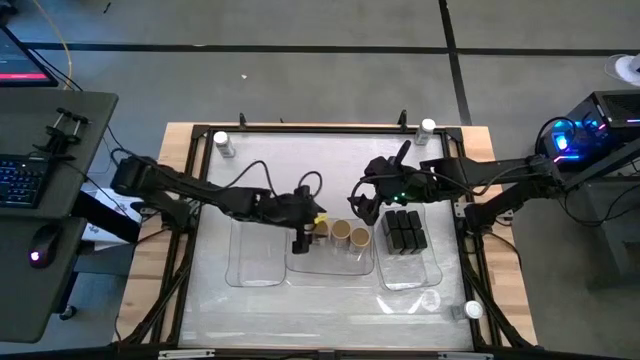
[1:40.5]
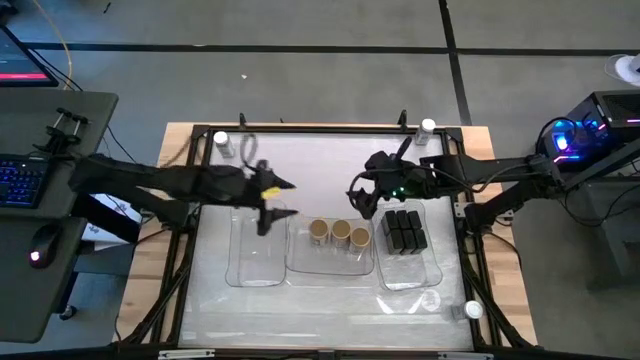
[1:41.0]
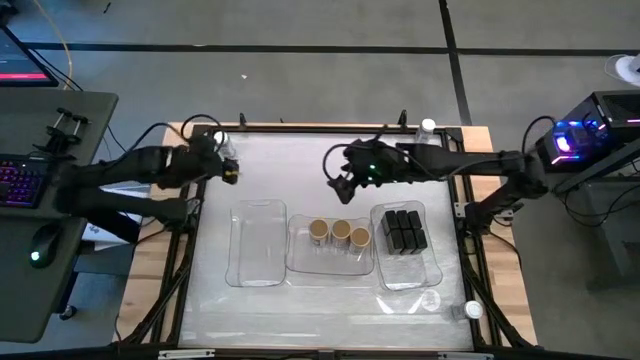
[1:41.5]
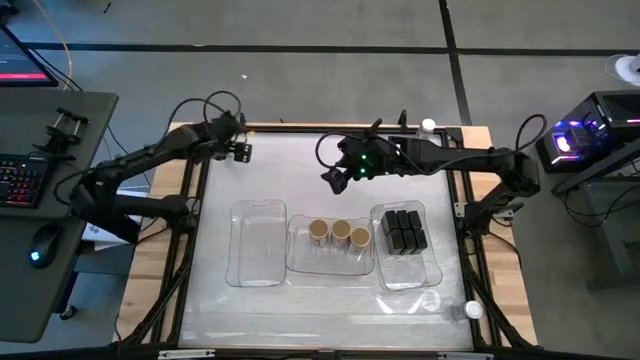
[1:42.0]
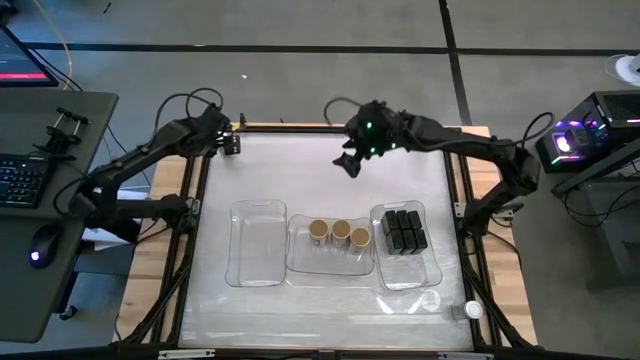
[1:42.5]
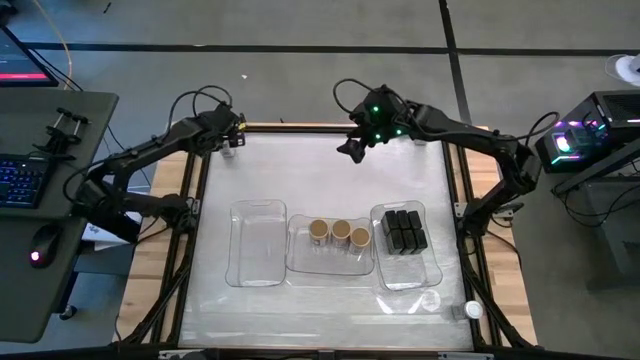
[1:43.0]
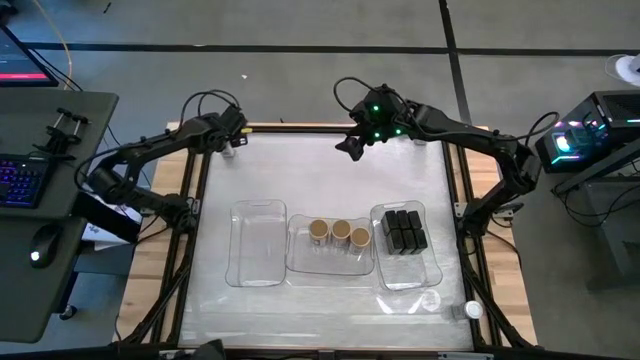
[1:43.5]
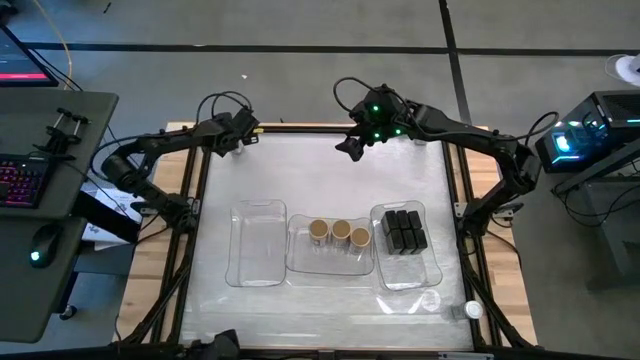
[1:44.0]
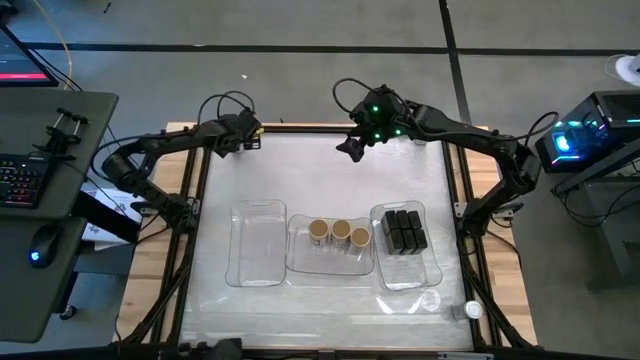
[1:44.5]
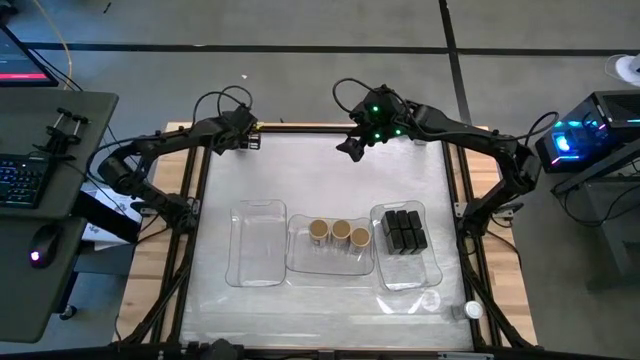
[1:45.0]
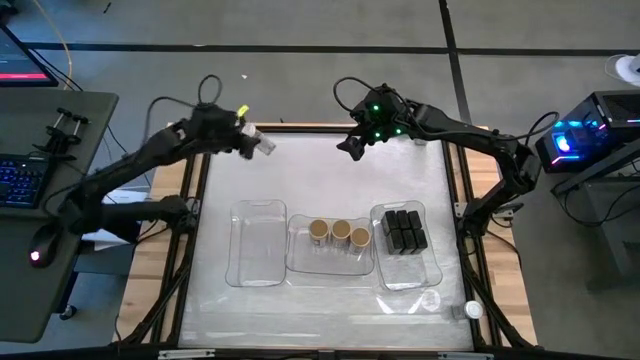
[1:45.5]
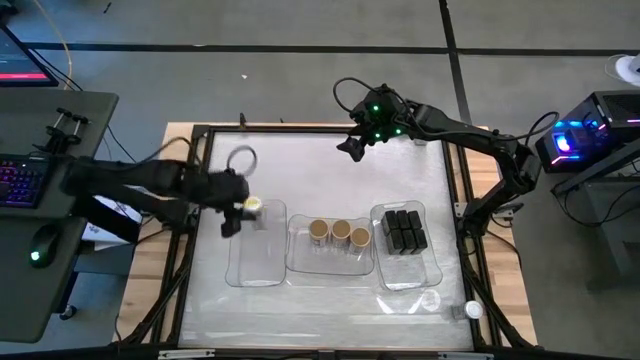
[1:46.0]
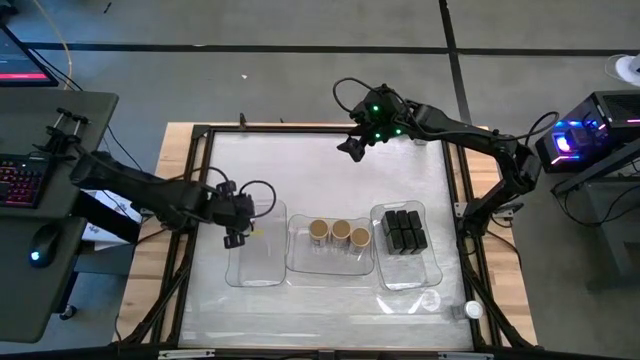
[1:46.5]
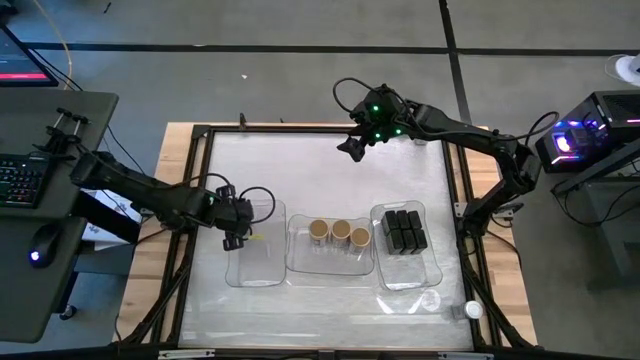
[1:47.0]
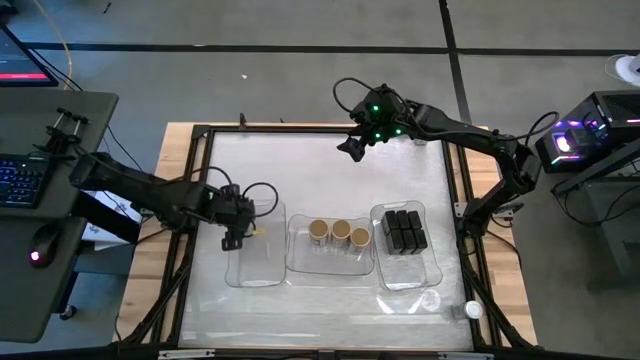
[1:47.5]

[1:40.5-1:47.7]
Task: Sort spices by type
Put the white seasoning bottle into the left transparent bin

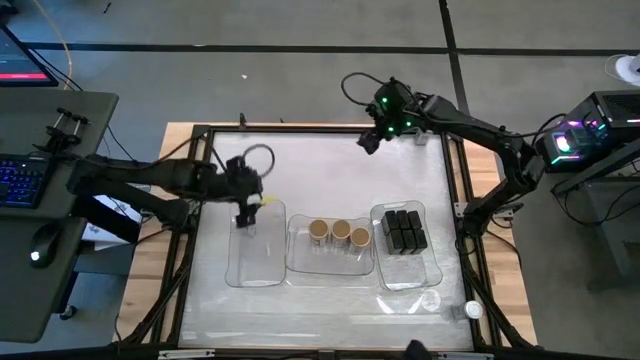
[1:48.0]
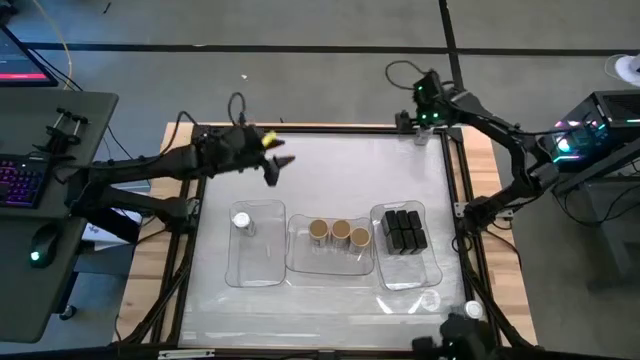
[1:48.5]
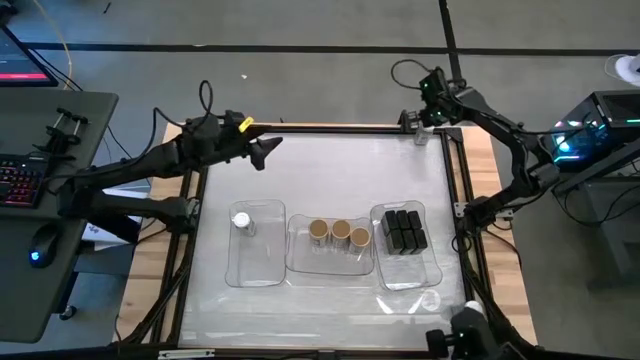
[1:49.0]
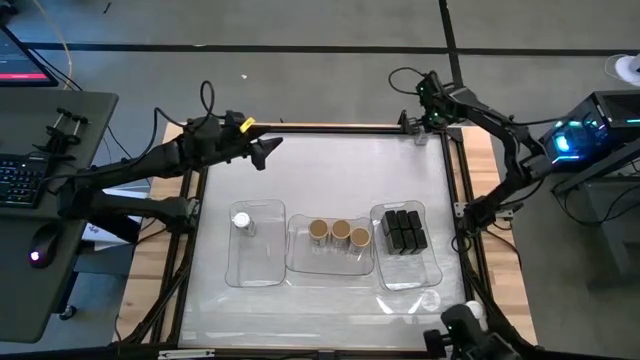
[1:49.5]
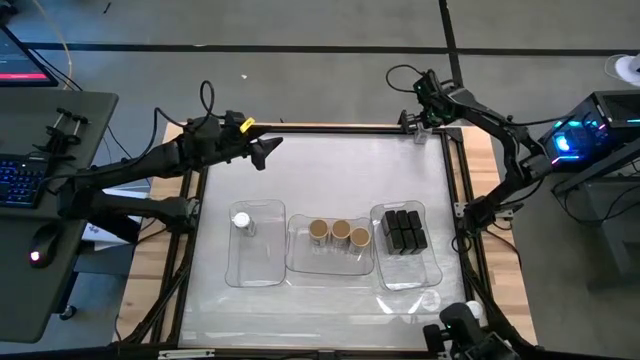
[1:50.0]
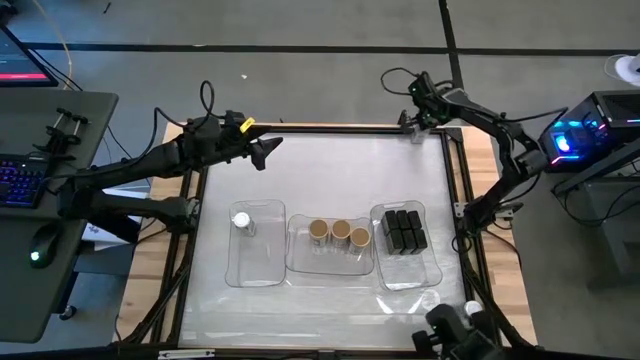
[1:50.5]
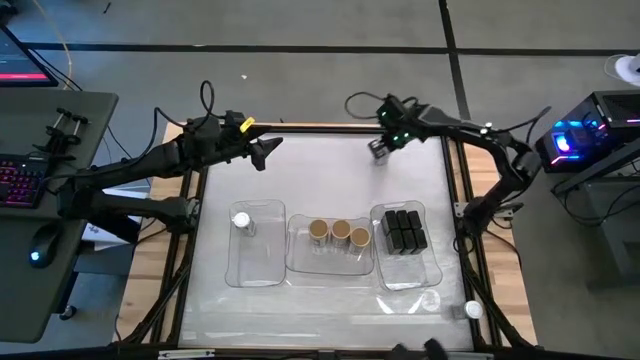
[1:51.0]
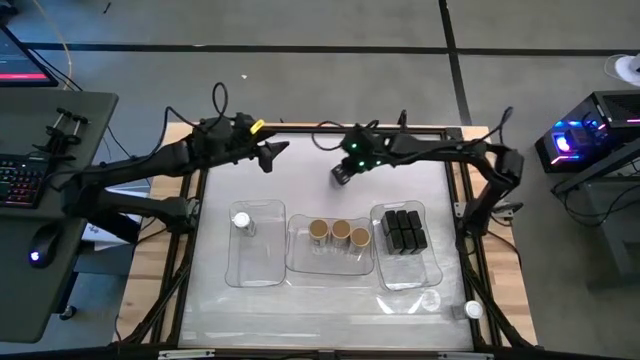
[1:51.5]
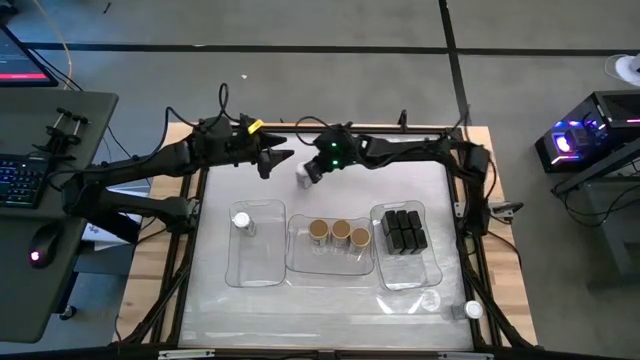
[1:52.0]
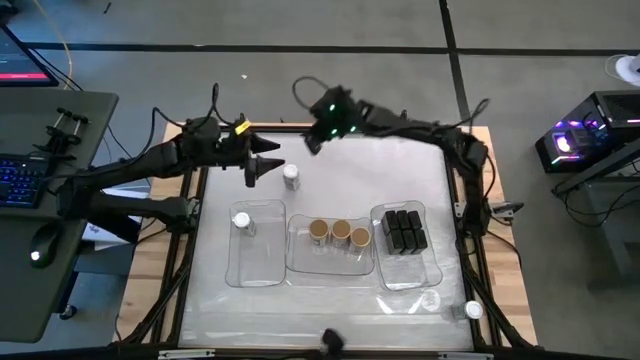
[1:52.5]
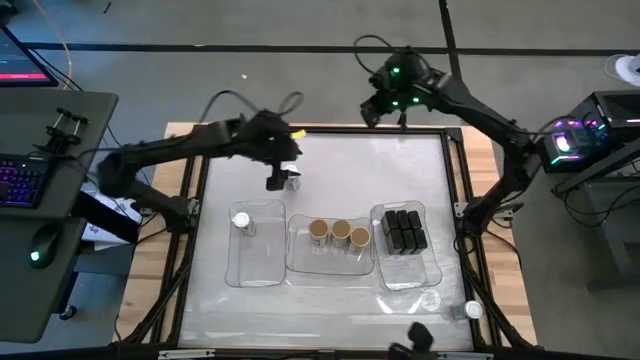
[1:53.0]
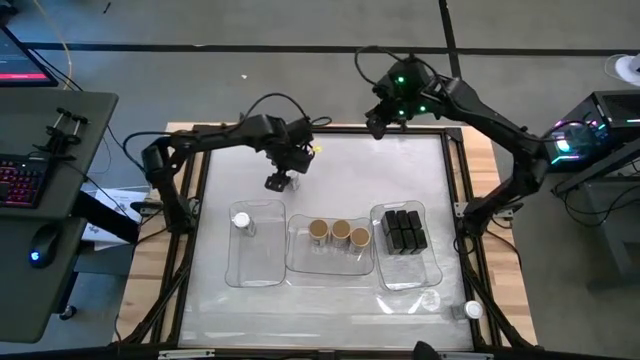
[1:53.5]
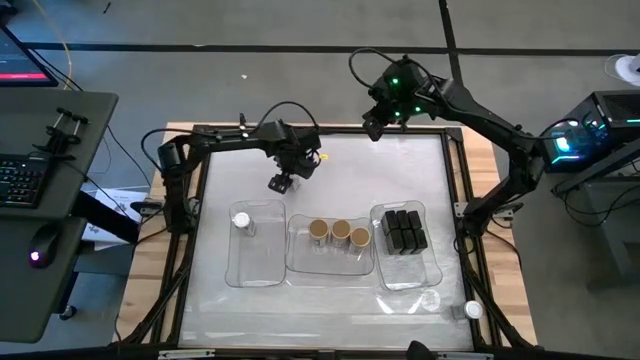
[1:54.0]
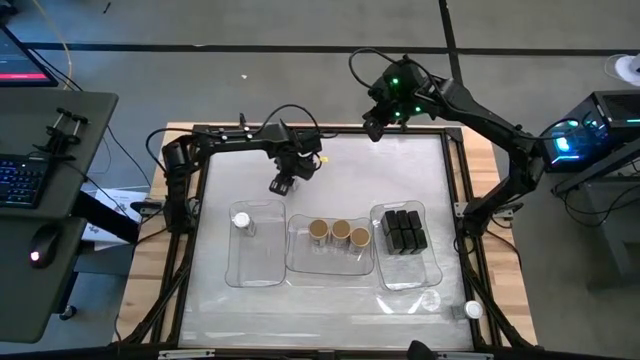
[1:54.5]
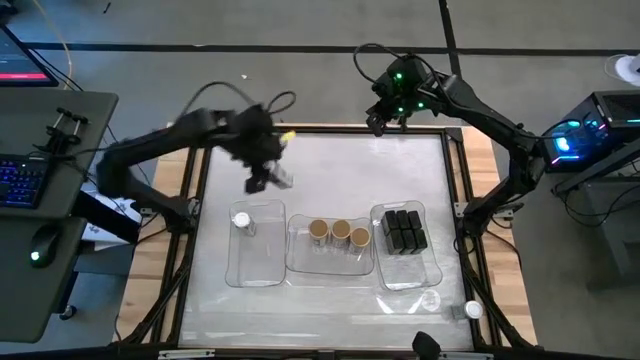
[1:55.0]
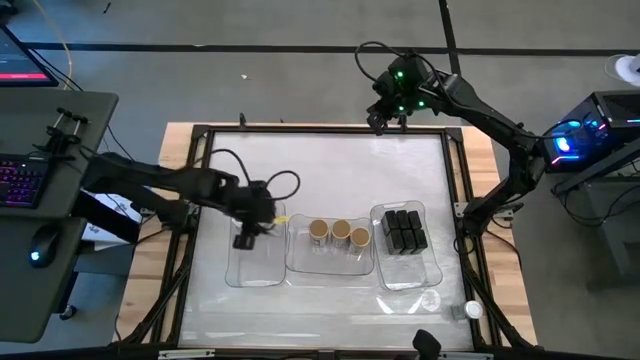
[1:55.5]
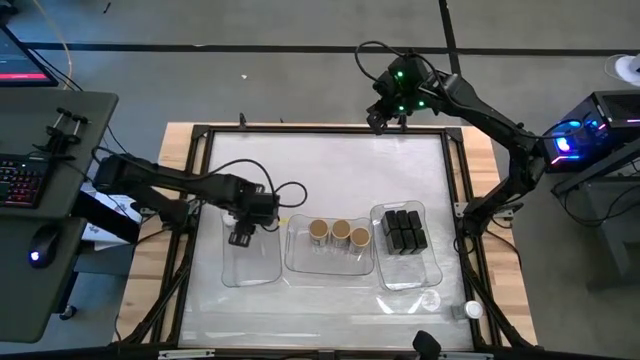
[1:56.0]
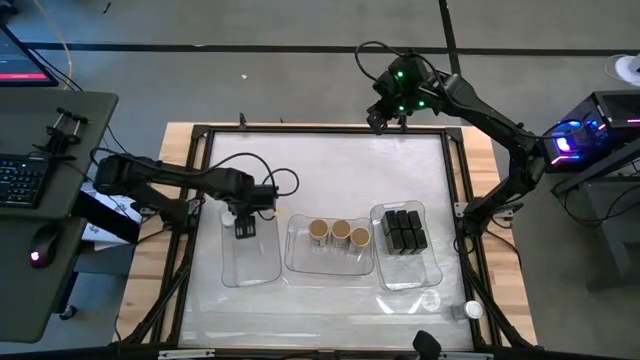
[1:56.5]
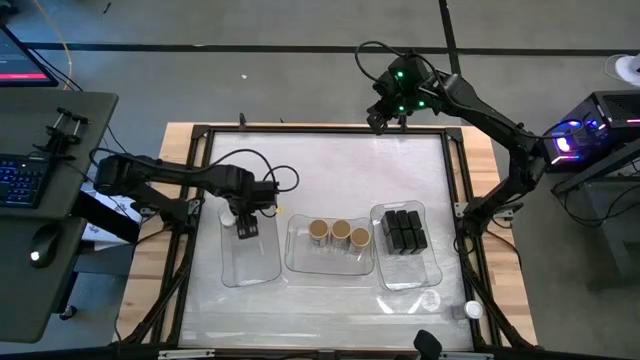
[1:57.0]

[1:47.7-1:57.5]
Put the white seasoning bottle into the left transparent bin aligned with the other white seasoning bottle

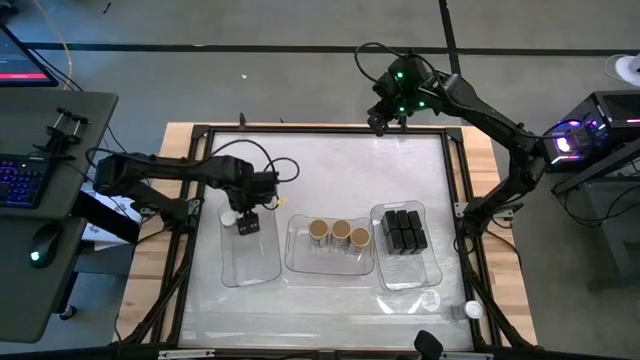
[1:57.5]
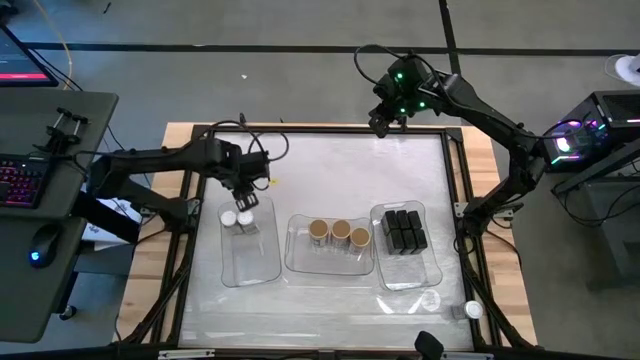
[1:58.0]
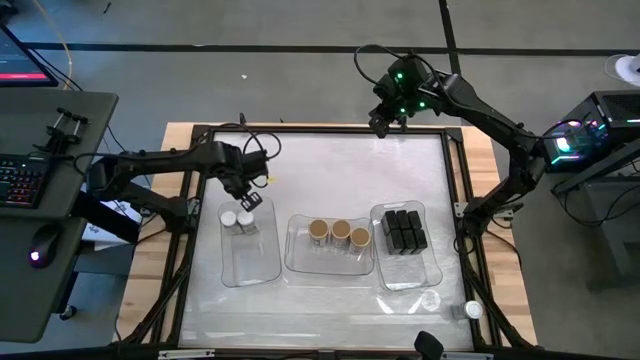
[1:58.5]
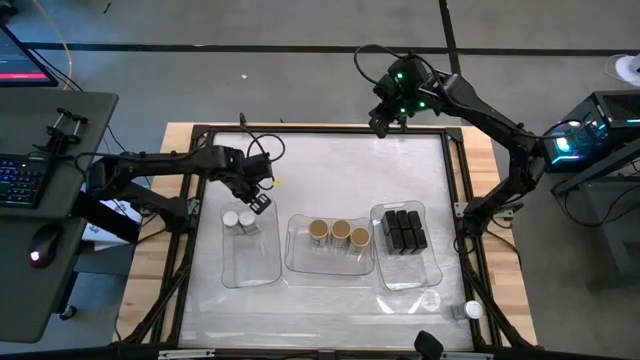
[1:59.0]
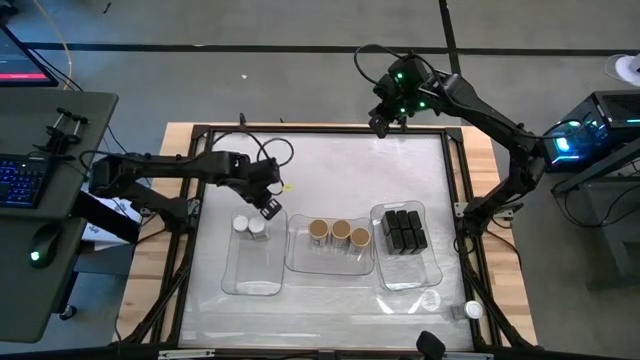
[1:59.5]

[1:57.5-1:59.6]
Adjust the left transparent bin

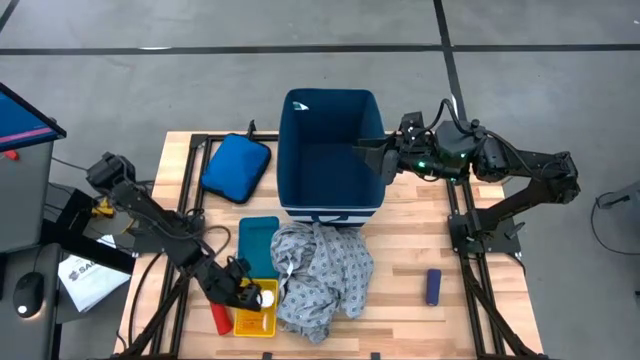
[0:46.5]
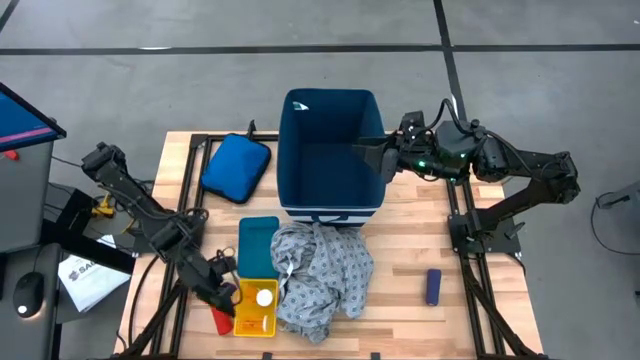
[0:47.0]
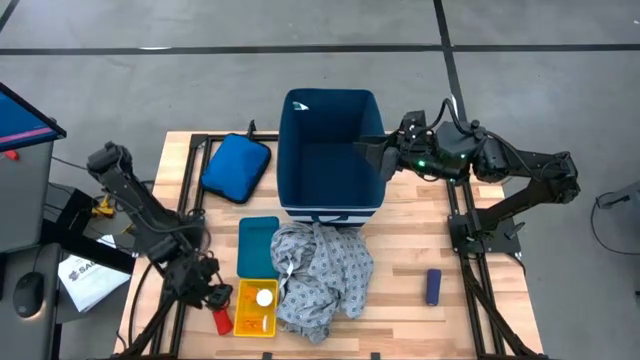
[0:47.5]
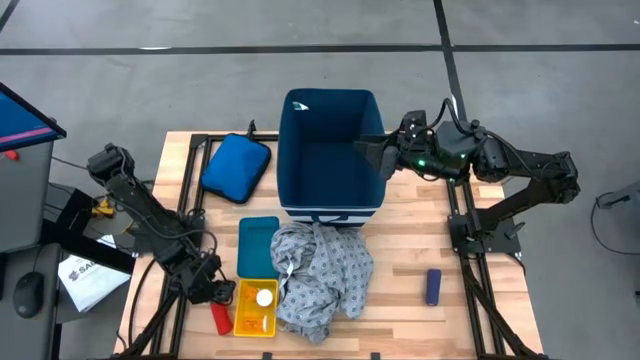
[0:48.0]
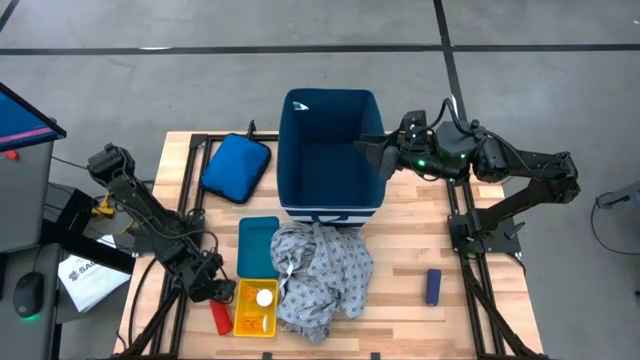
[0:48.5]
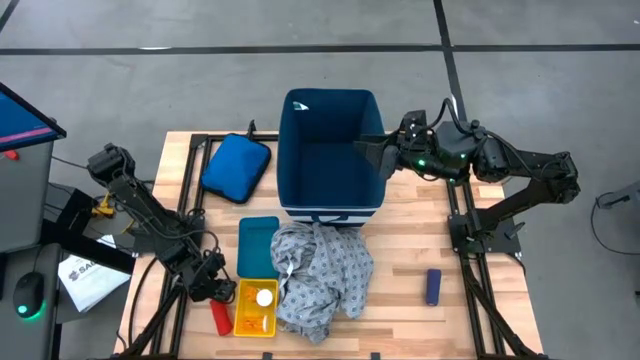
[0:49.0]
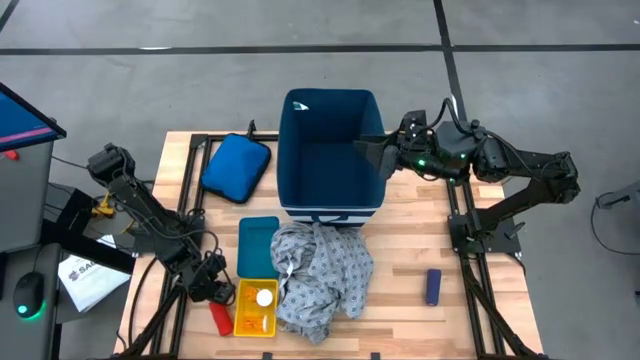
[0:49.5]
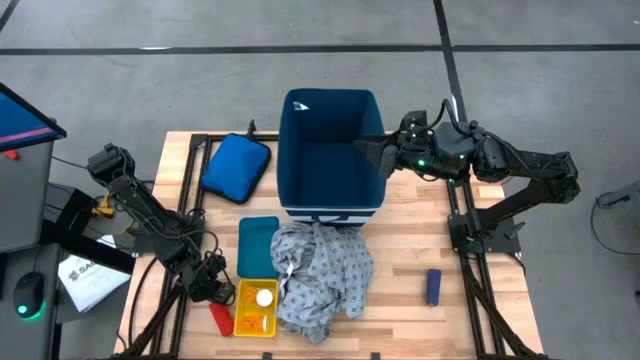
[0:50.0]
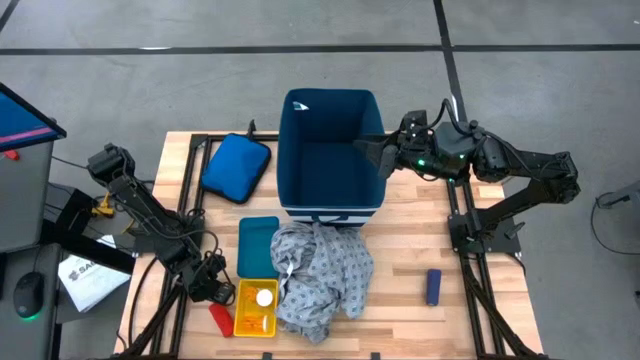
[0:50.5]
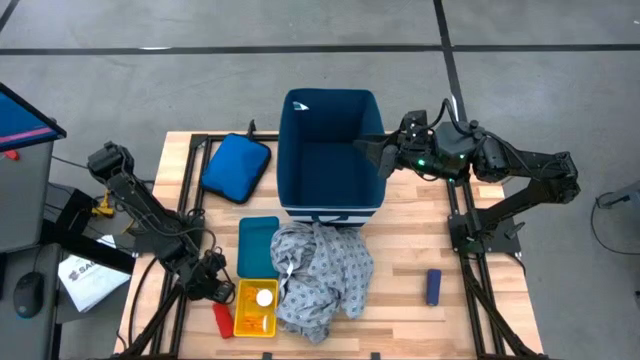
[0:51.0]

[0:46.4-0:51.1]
Task: Pick & place medical supplies in basket/bin
Put the red bandage into the blue bin
